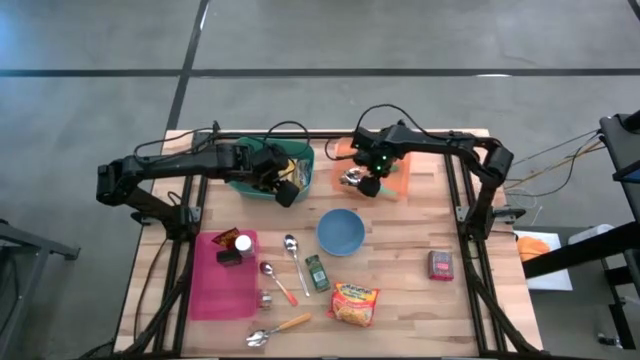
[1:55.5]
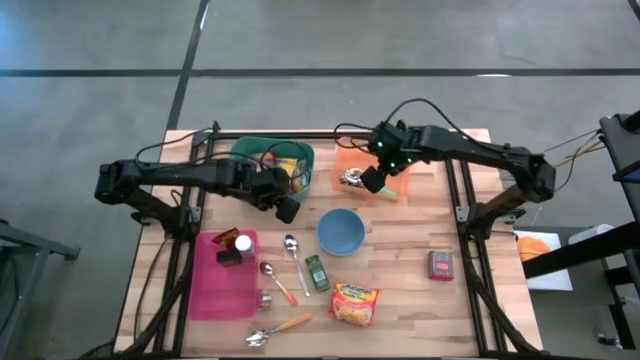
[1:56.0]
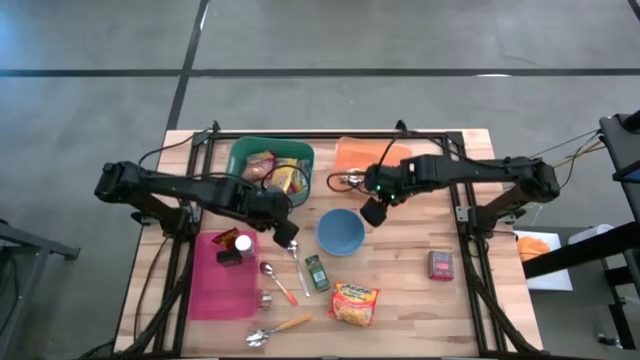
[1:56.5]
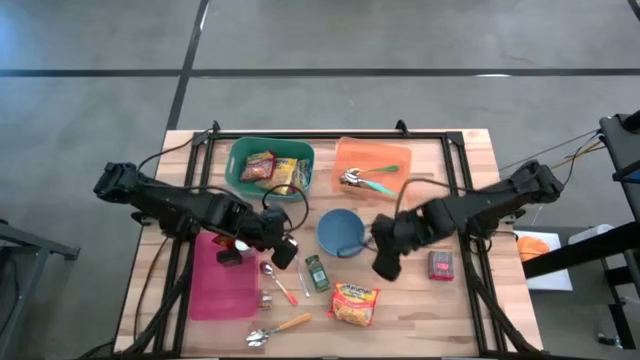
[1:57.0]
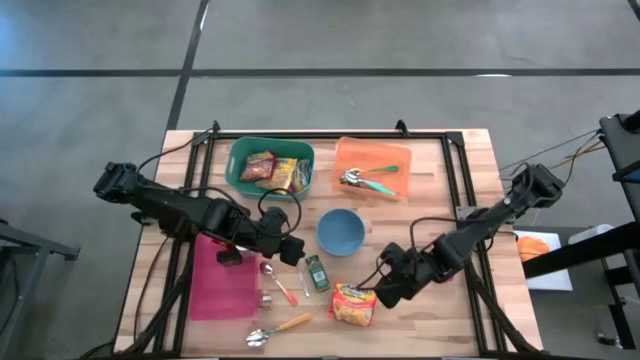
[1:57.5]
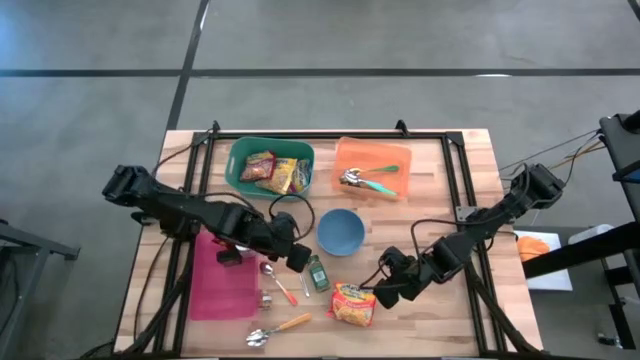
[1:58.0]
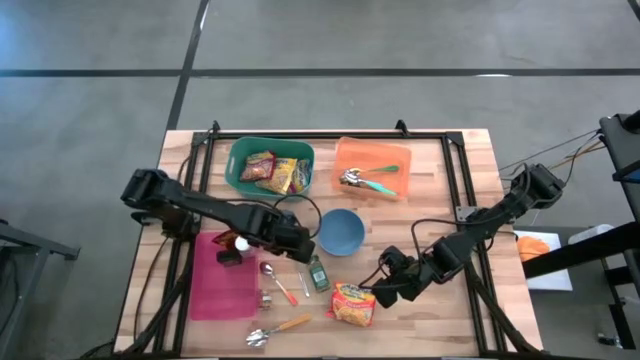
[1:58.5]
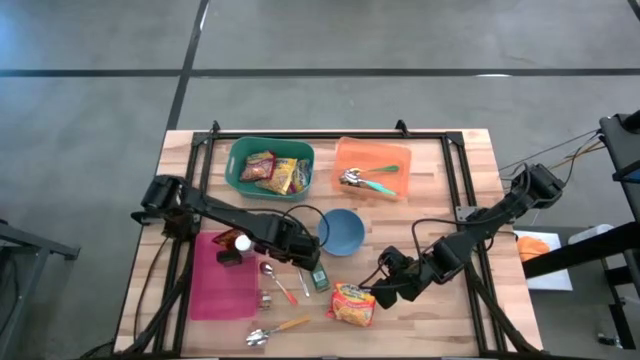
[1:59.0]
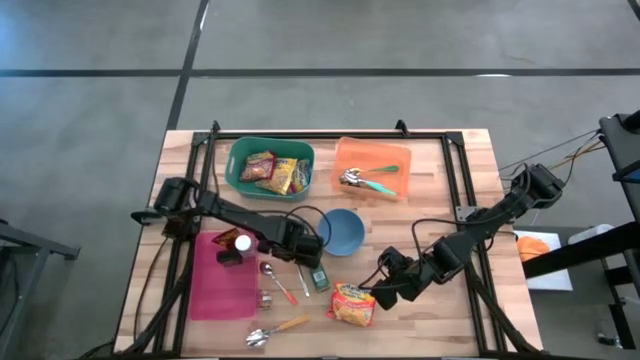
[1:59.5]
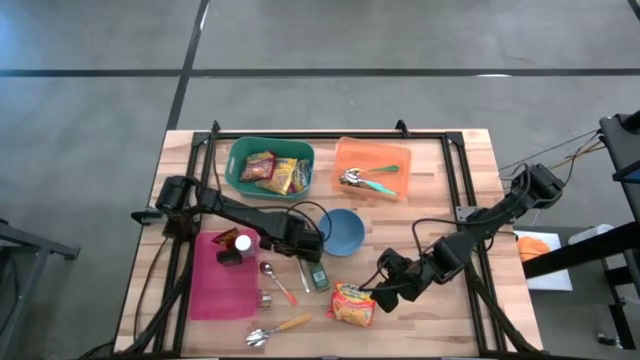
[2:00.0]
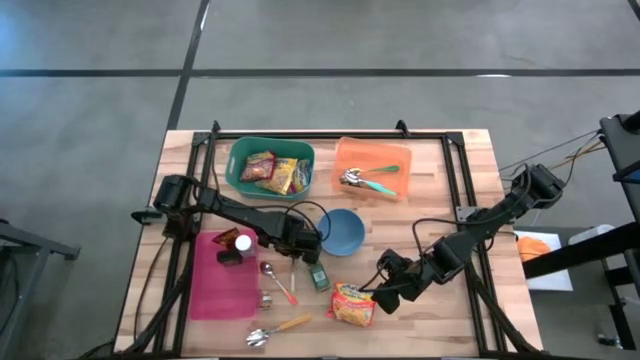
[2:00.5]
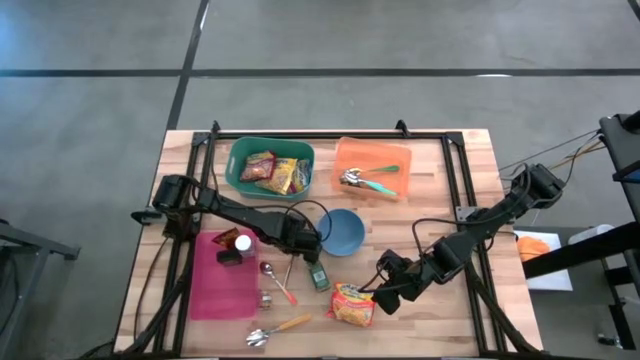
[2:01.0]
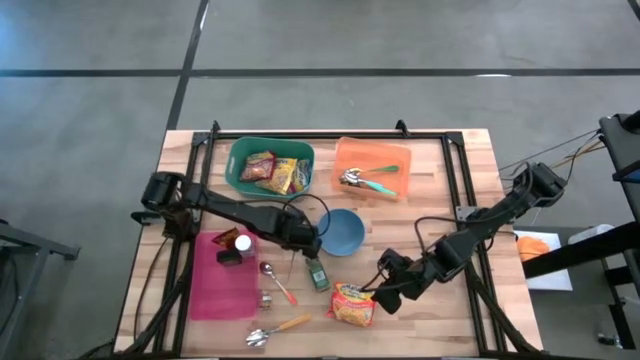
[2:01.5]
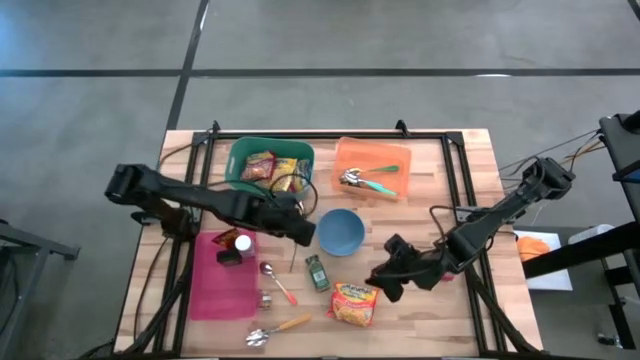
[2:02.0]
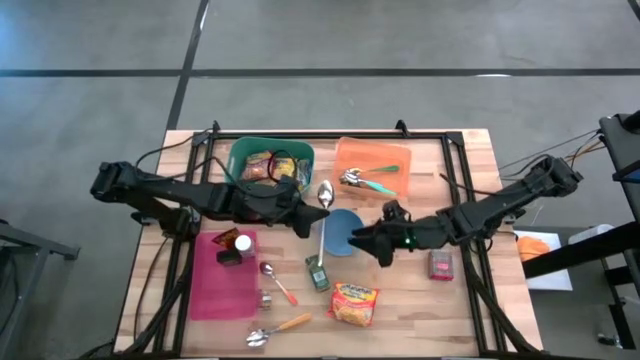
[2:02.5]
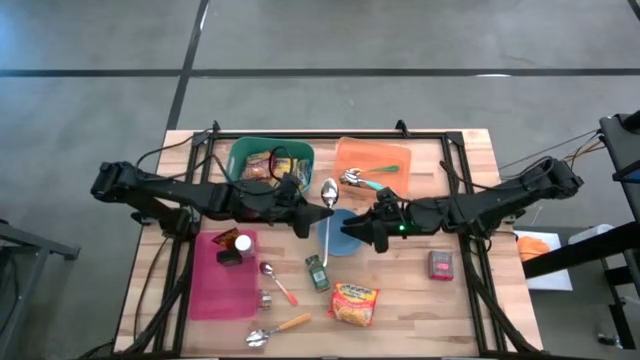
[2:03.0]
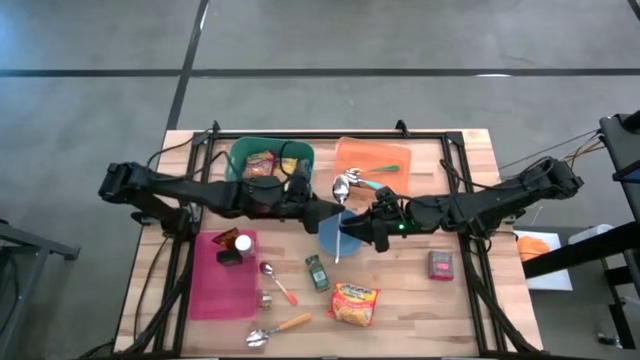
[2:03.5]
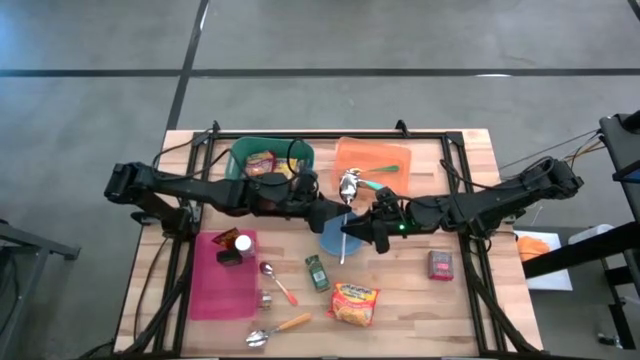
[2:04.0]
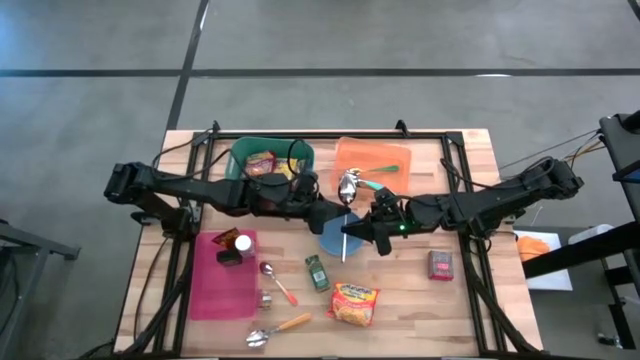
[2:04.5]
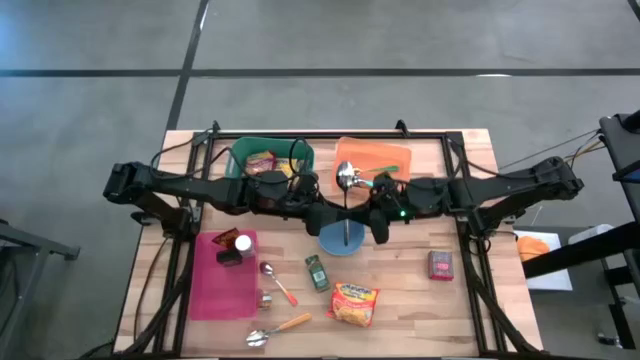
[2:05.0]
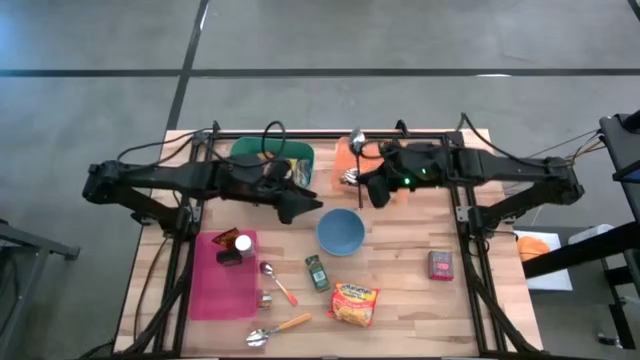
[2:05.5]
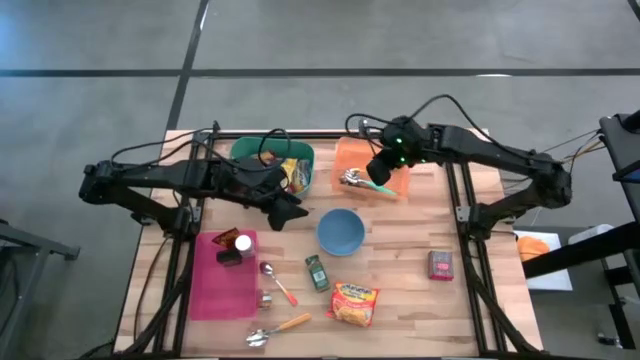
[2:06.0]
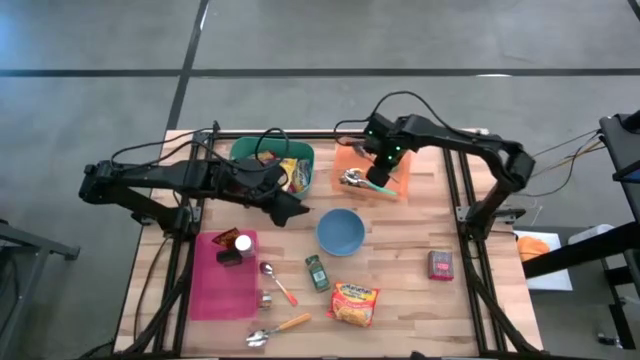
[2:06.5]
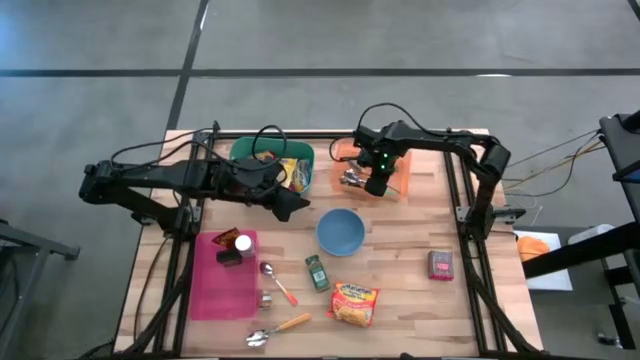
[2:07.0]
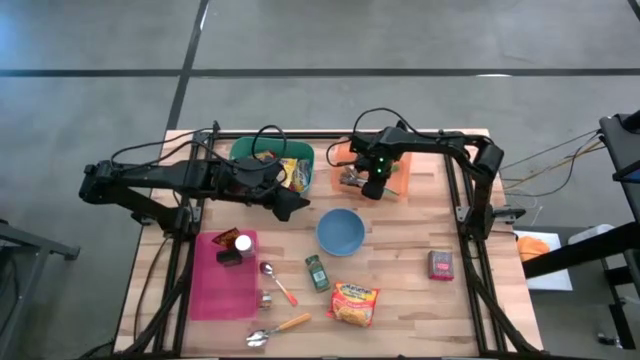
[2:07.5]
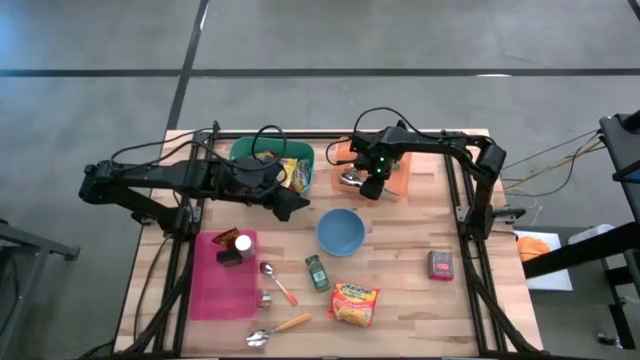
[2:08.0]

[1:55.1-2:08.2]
Put the silver spoon into the orange bin

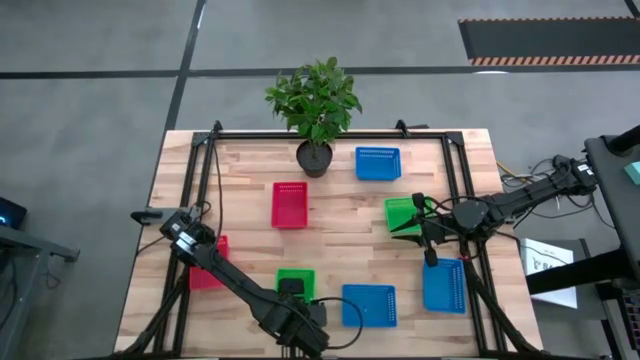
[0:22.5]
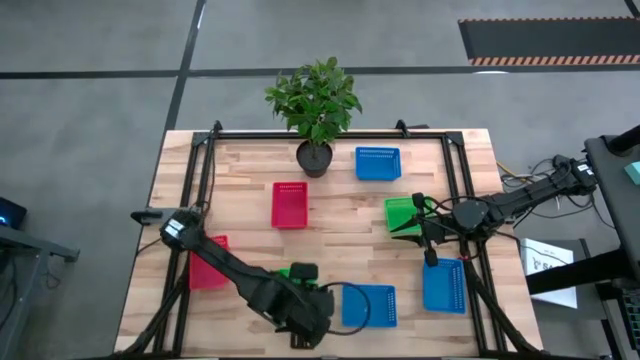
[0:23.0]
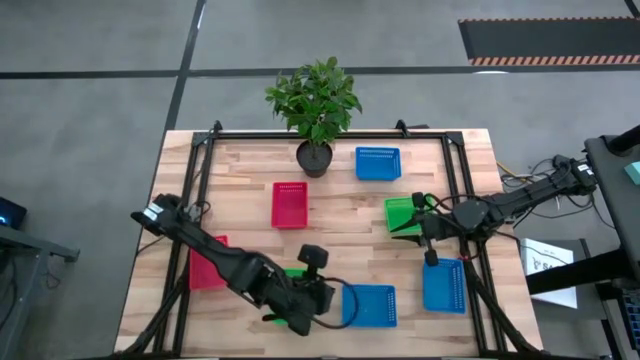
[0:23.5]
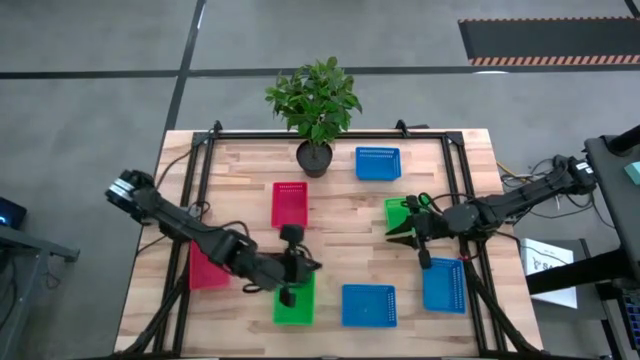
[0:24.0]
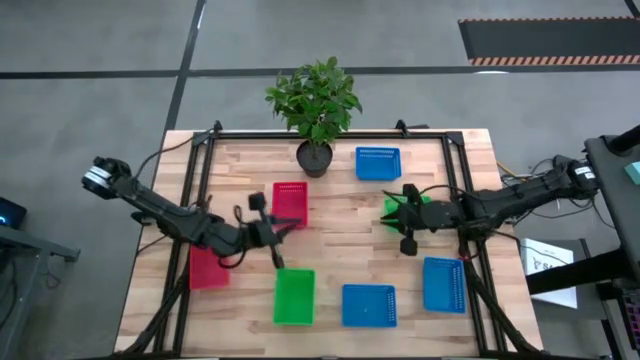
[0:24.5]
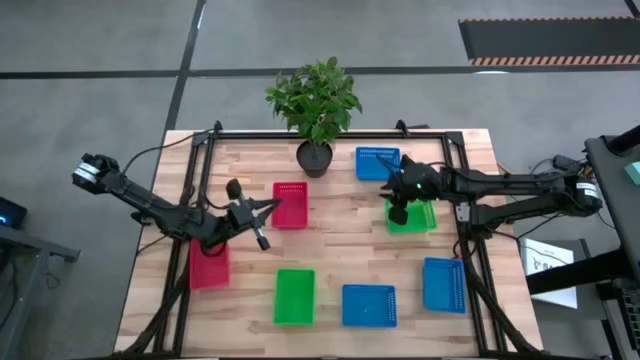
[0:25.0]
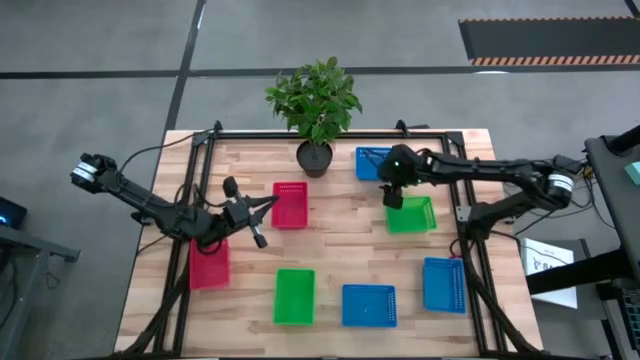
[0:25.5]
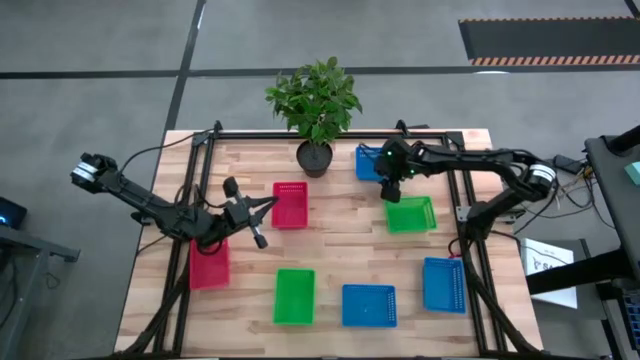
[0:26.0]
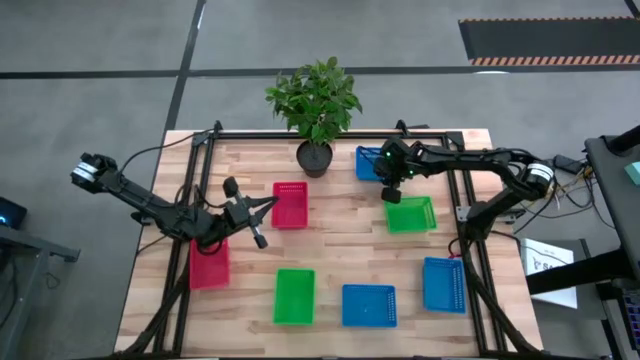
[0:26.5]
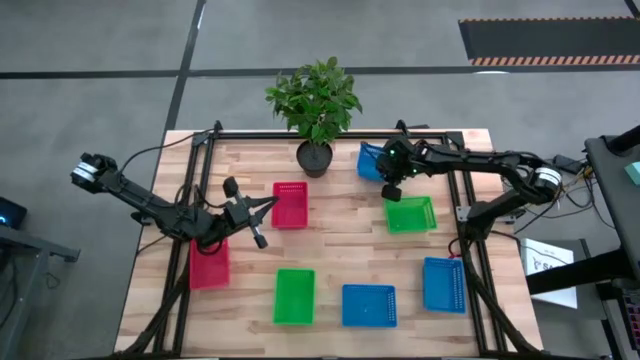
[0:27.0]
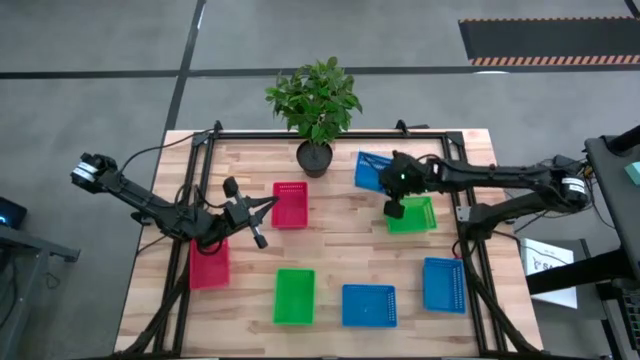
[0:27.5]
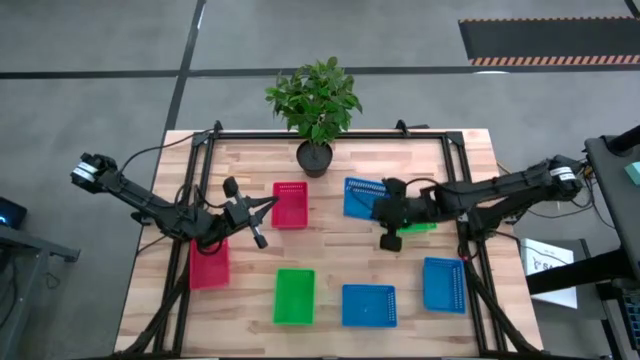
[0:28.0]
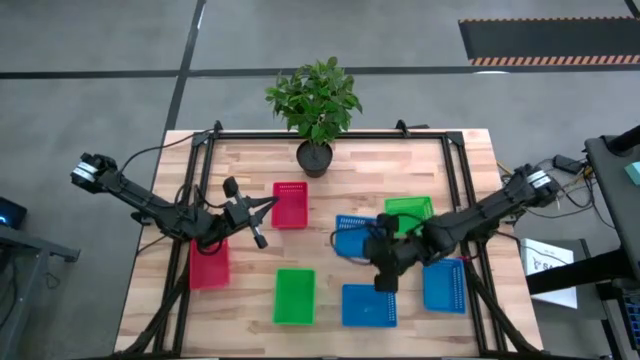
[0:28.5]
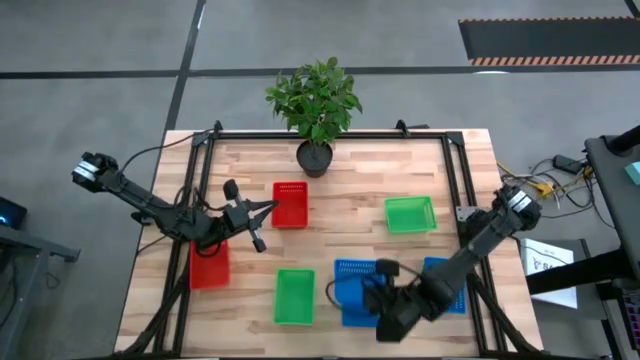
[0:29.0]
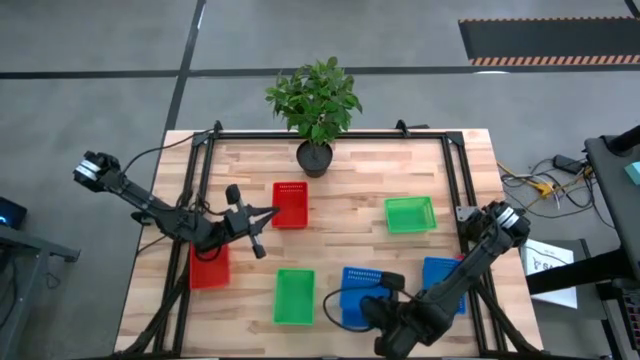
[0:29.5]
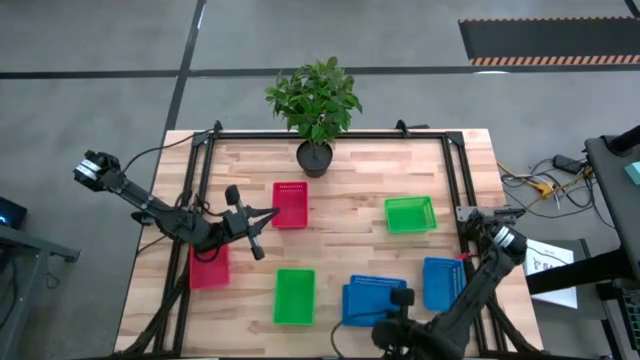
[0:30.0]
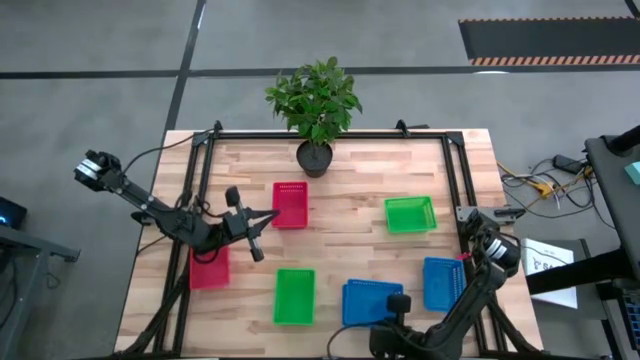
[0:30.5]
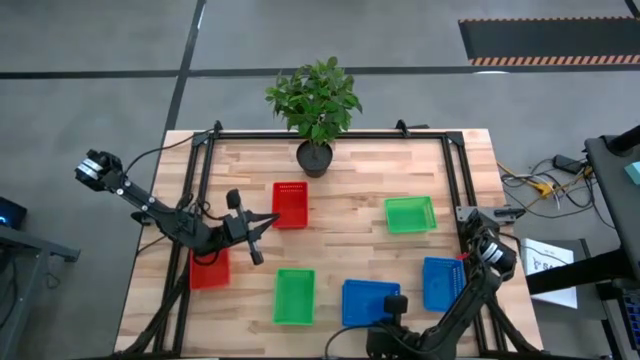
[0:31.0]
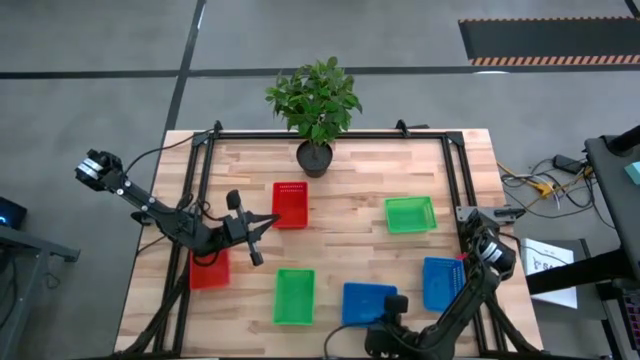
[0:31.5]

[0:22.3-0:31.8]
Stack the top blue basket on top of the bottom left blue basket
